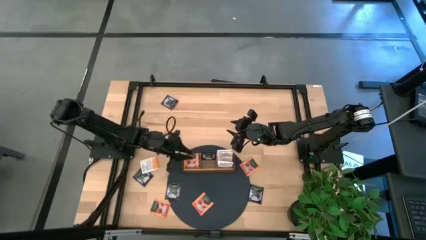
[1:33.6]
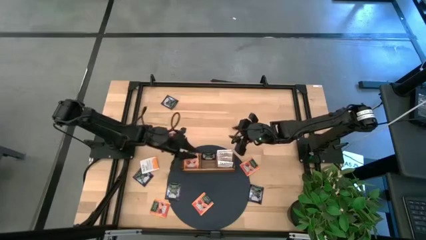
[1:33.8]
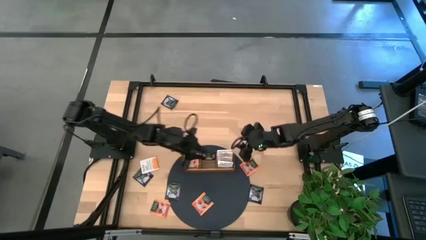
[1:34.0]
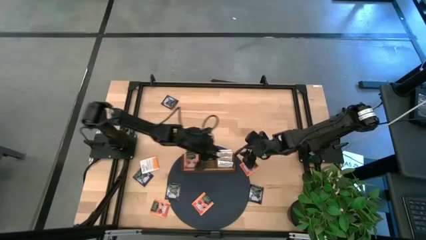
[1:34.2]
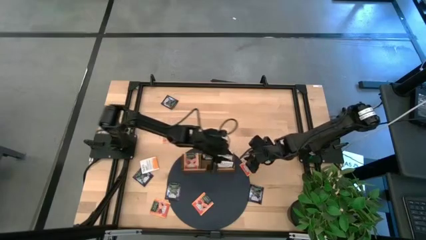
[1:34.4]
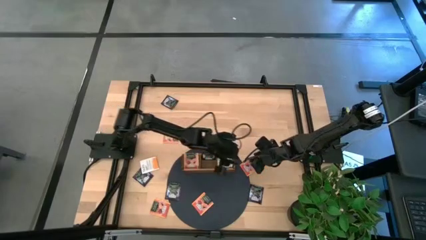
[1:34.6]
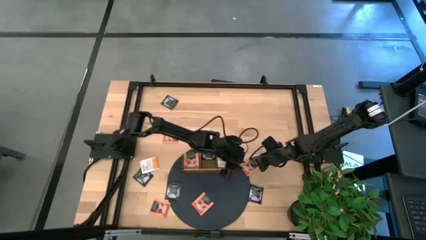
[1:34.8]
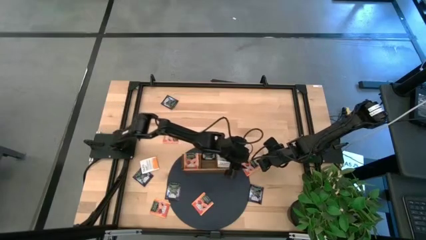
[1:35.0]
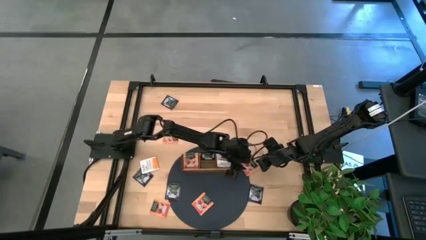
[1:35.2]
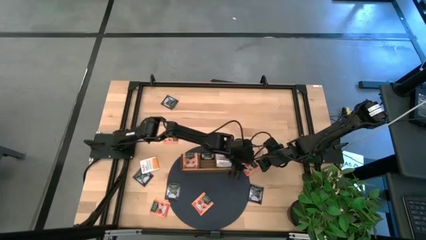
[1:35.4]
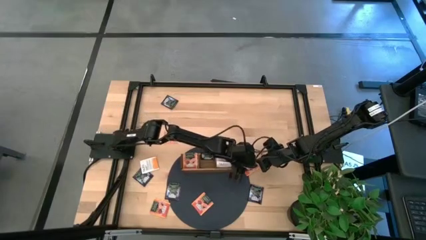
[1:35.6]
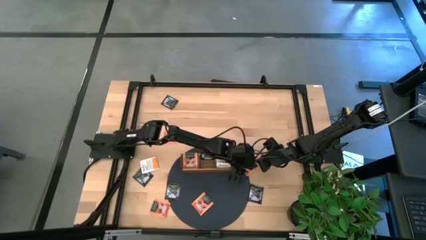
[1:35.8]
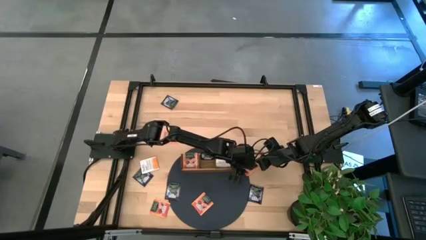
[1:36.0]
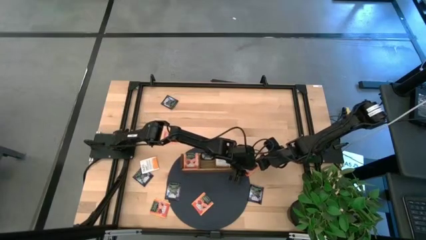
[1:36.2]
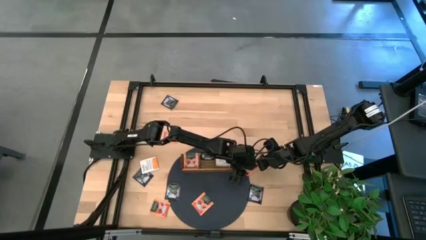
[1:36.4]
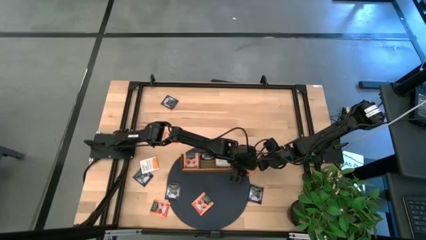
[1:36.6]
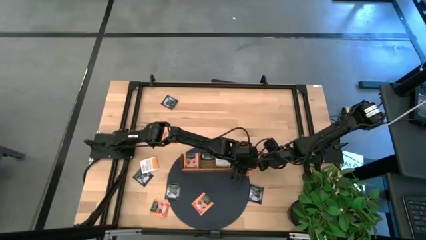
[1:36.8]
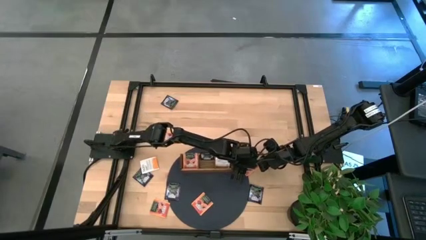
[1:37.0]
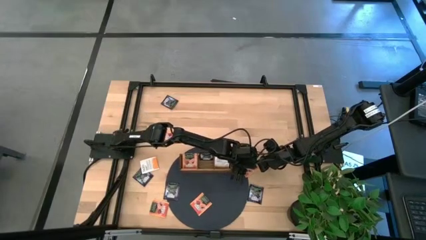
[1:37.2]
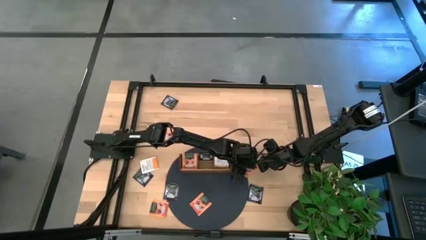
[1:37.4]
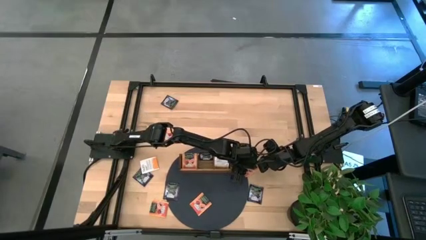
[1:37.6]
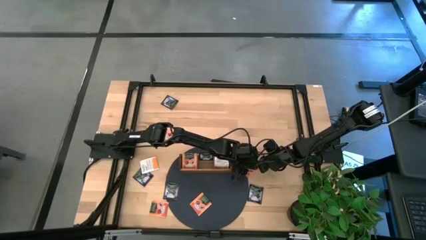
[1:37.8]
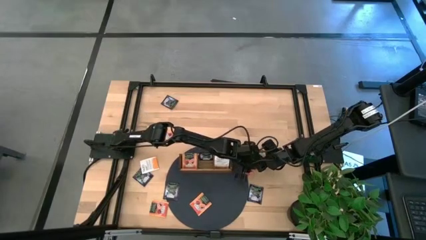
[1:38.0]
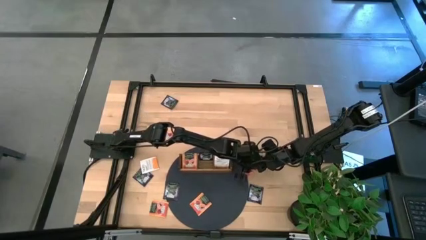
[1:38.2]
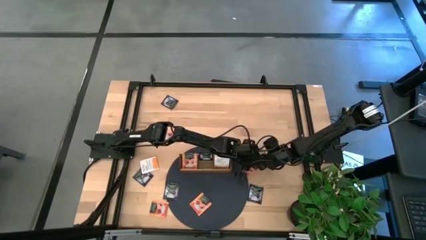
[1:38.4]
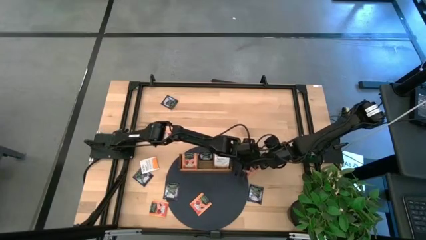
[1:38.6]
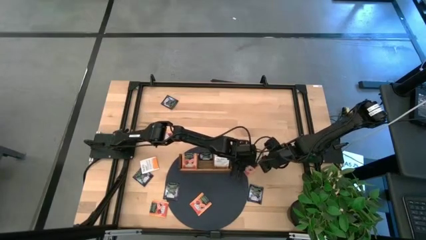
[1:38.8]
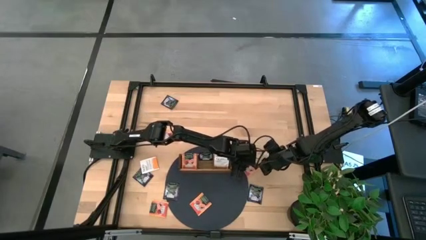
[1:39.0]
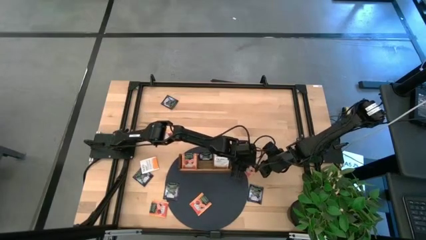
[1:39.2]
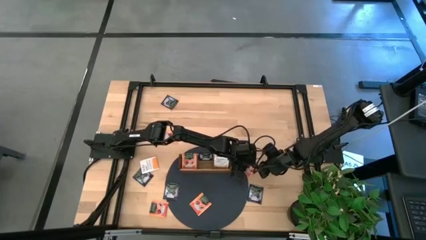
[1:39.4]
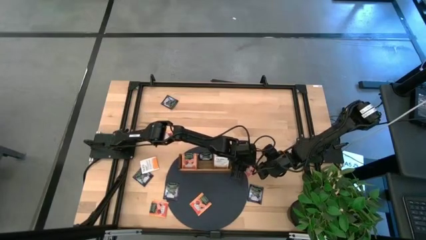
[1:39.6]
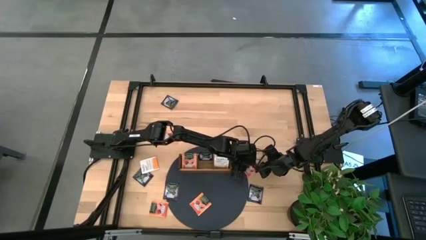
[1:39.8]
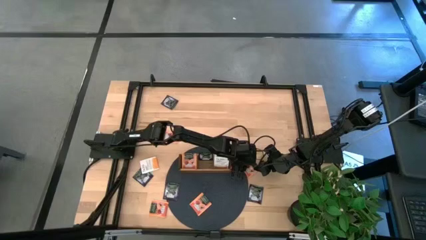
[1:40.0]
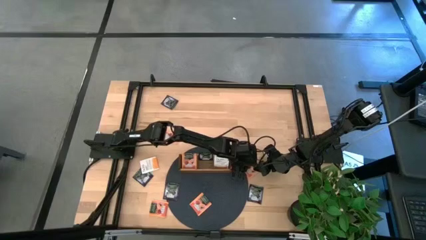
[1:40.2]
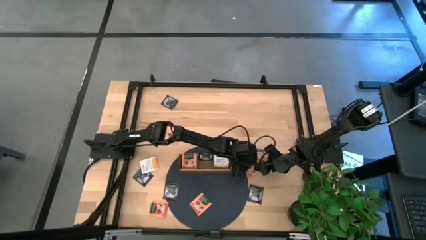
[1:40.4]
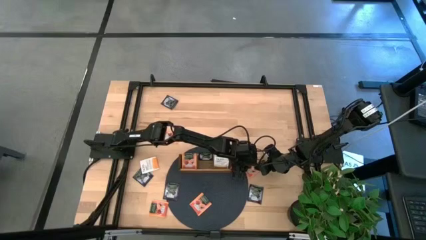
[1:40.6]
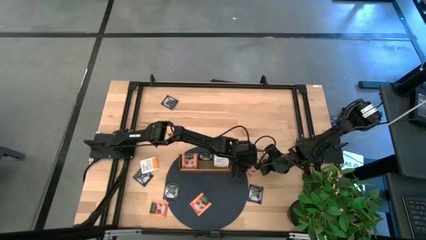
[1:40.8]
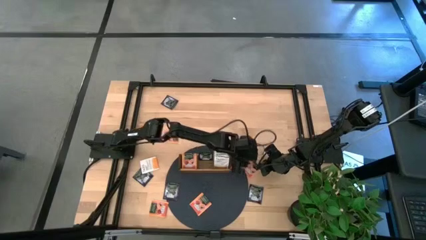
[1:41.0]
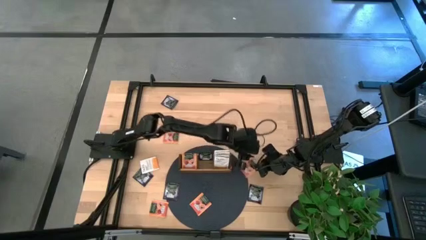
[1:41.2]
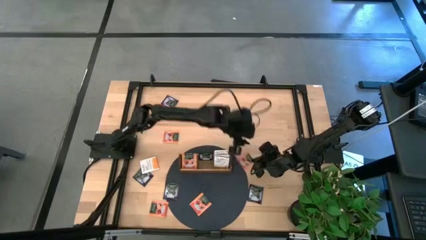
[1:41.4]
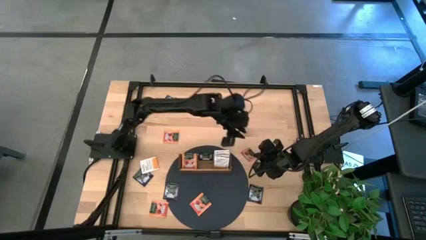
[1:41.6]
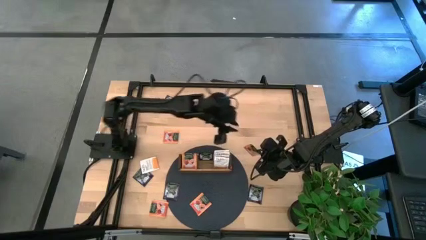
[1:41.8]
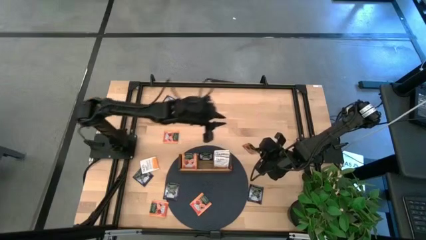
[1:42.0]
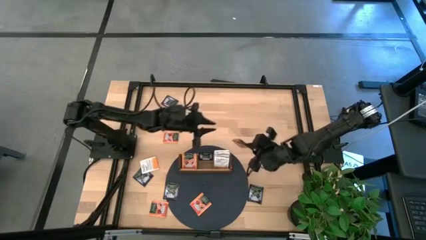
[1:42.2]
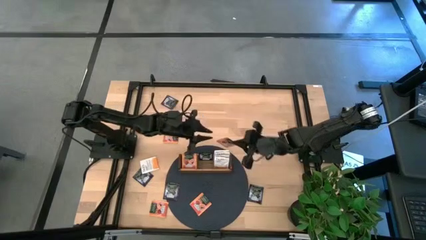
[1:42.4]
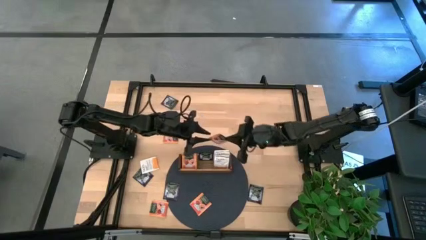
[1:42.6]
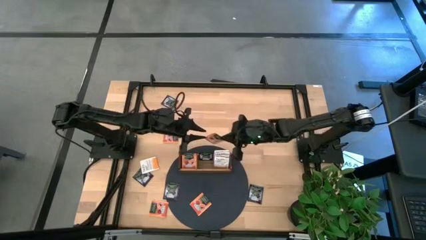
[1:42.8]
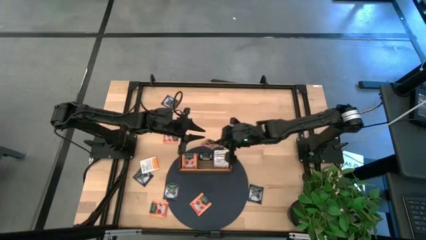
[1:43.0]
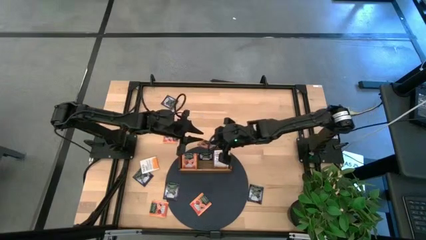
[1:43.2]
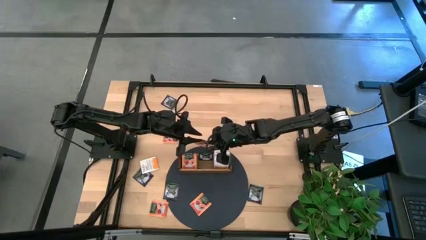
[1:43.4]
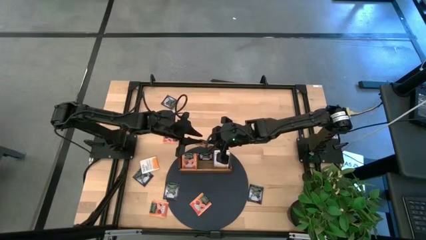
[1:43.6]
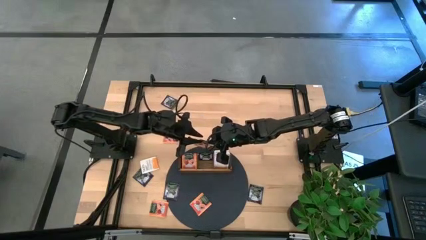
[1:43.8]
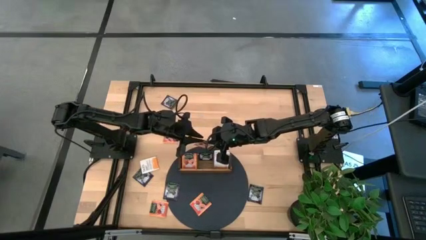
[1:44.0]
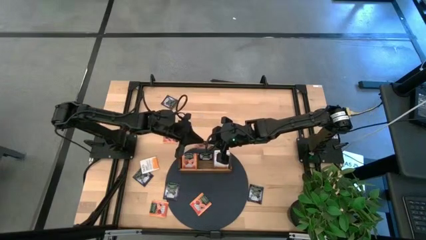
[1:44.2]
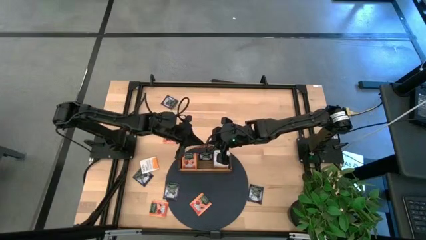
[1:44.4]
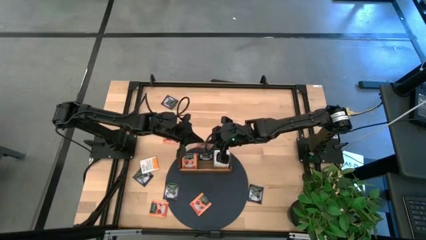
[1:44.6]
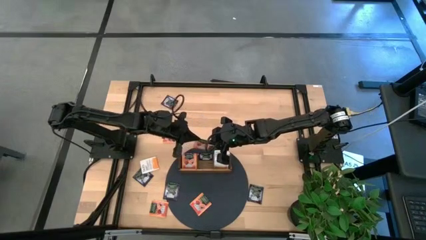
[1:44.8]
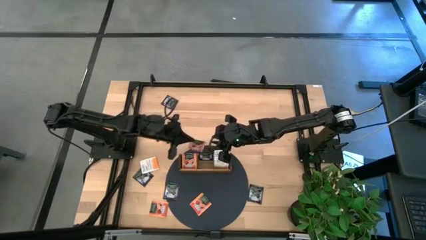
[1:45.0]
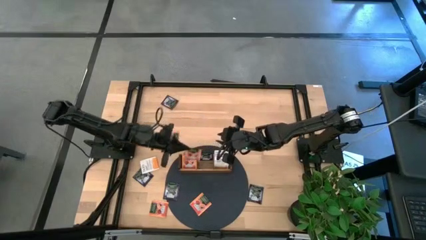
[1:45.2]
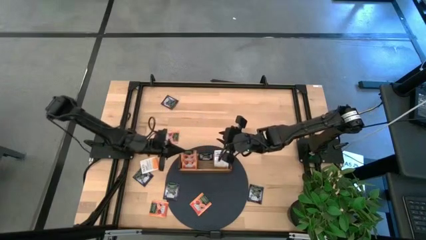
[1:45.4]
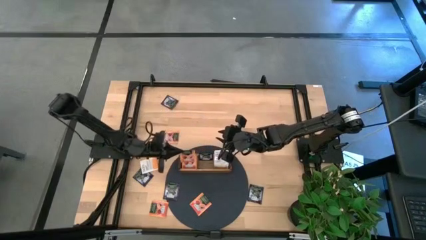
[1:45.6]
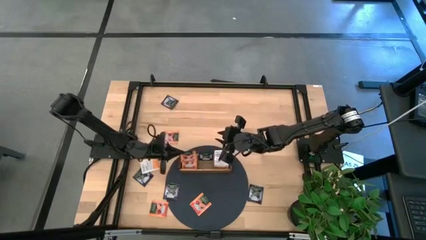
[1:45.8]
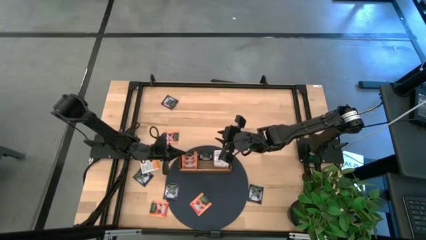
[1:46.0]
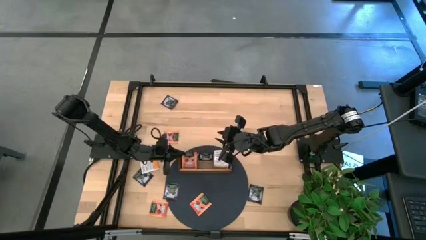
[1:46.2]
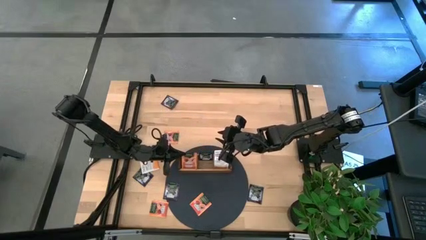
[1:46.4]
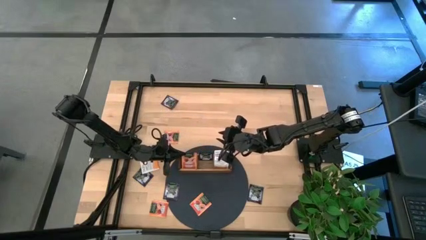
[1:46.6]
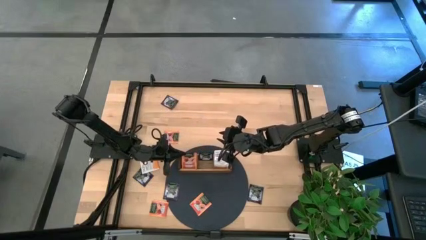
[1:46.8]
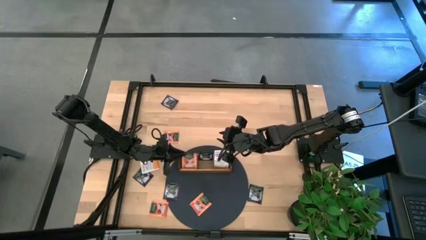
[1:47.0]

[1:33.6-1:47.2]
Task: Pick & Place Tea
Put the orange tea bag into the left section of the wooden organizer

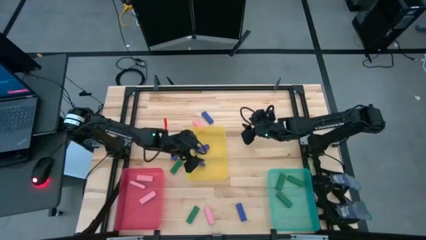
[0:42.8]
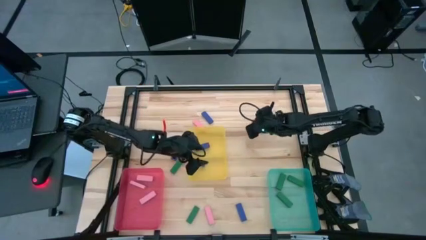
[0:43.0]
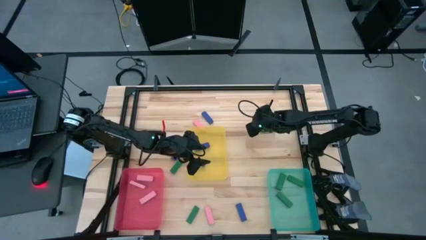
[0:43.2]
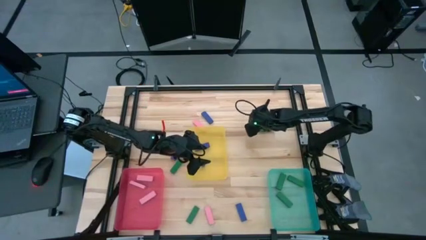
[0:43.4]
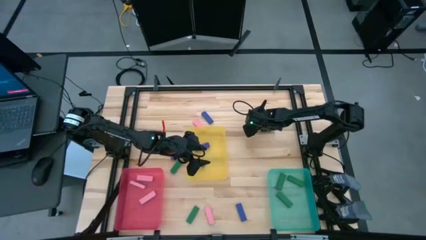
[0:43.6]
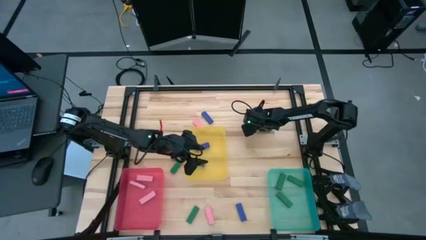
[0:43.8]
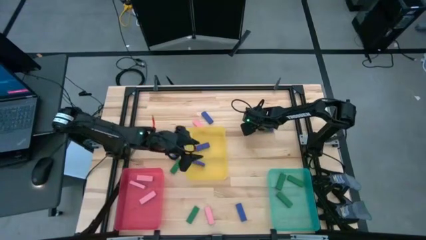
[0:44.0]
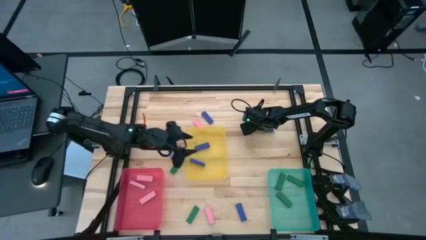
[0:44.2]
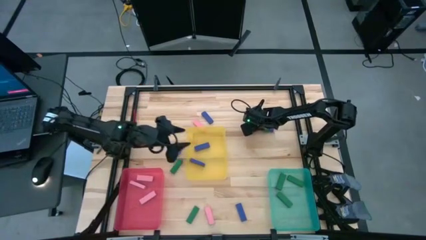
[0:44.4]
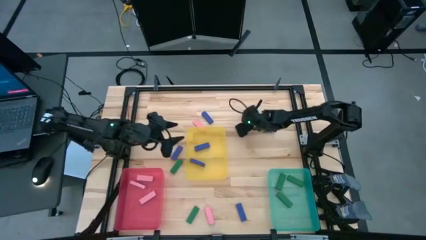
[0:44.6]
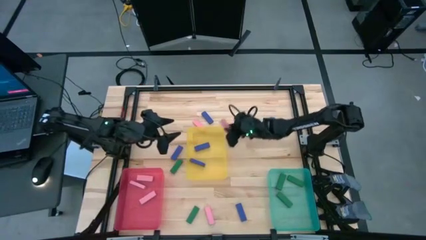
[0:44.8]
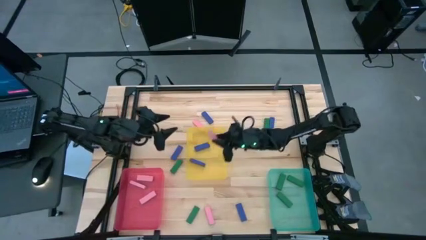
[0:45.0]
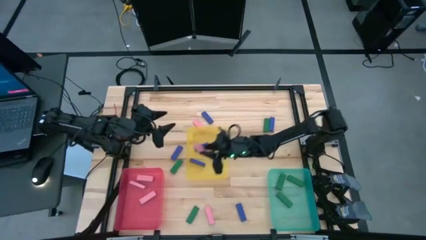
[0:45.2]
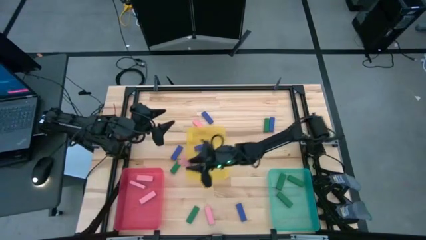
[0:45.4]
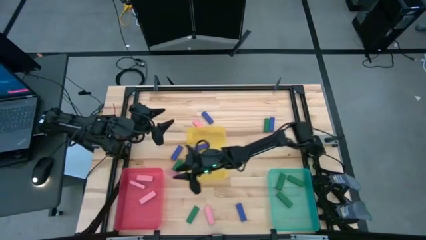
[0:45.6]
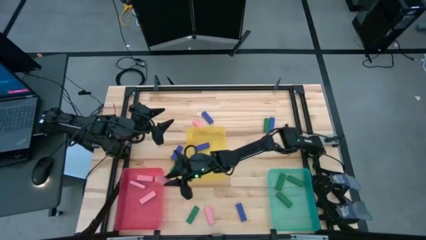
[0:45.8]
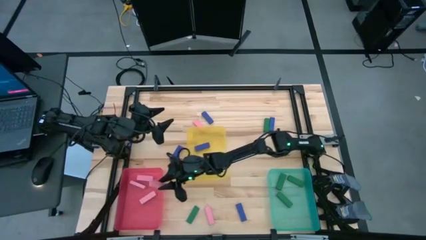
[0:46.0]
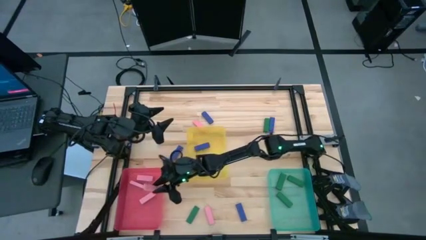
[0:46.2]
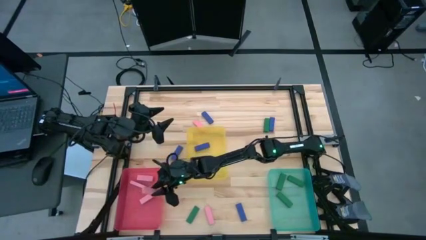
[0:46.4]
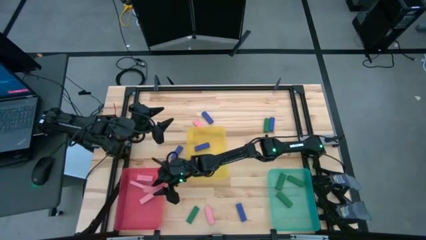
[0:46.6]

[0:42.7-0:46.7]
Task: Sort blocks
Put the top right pink block into the red bin
